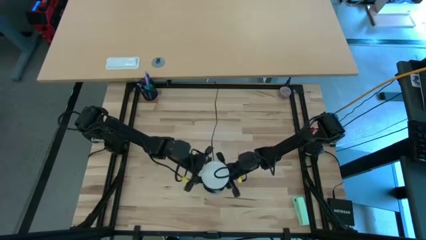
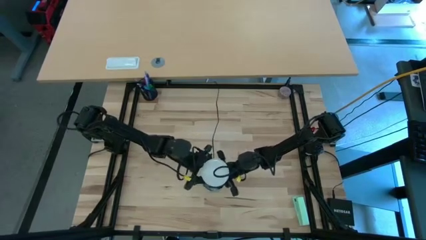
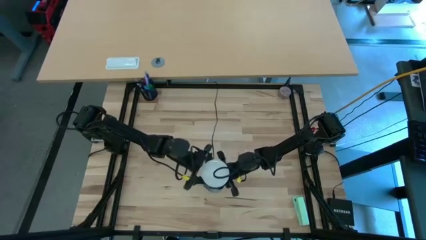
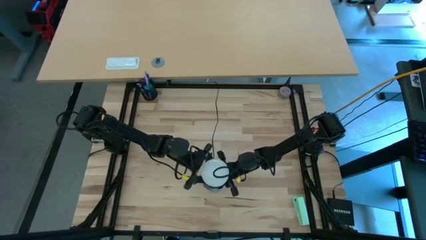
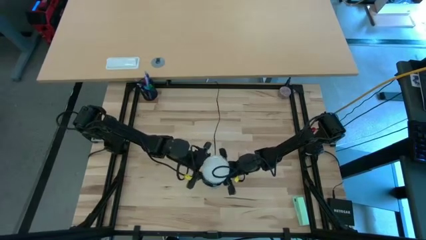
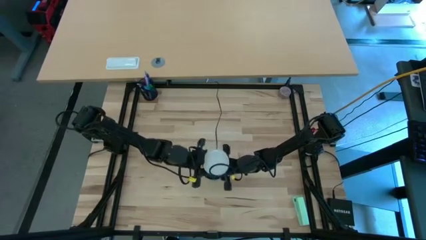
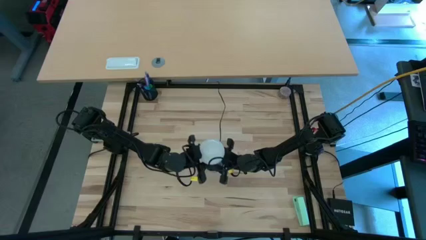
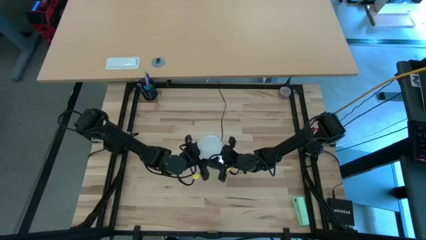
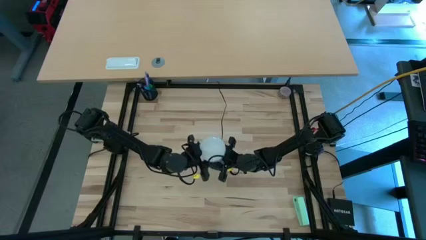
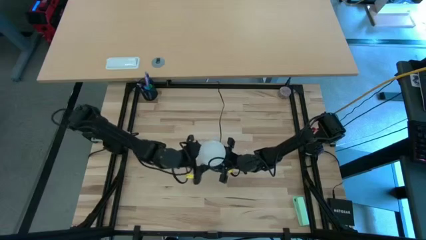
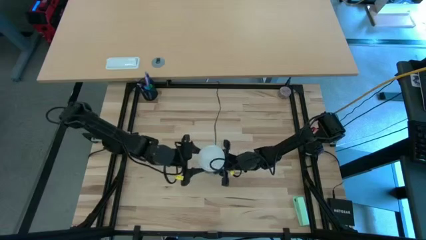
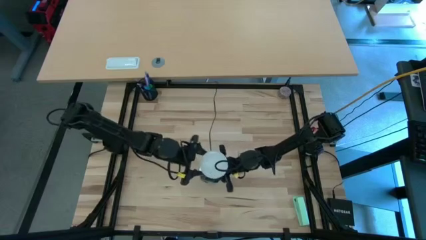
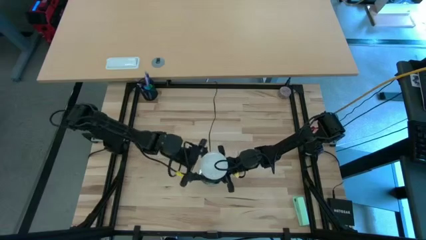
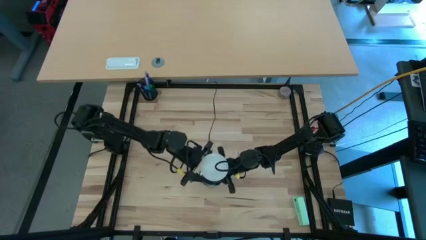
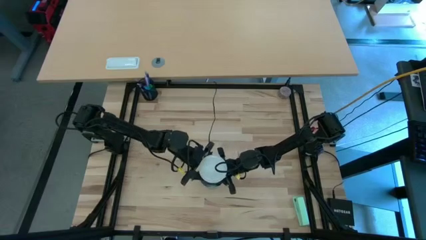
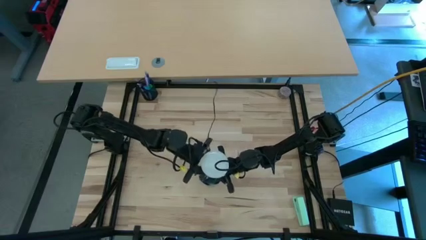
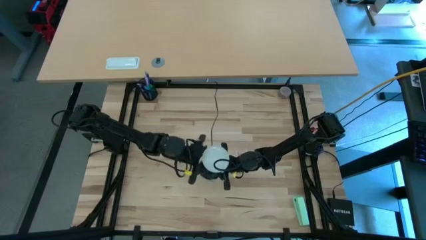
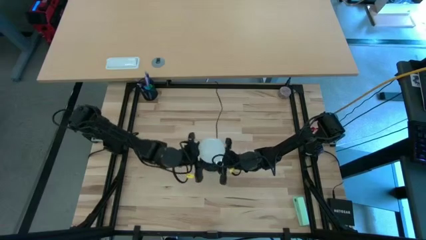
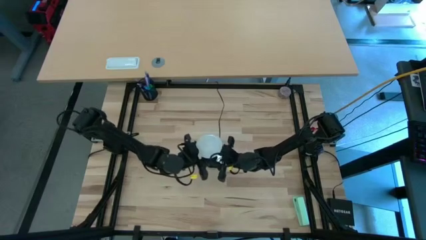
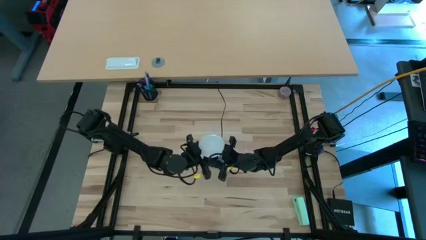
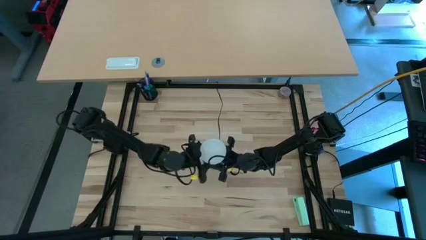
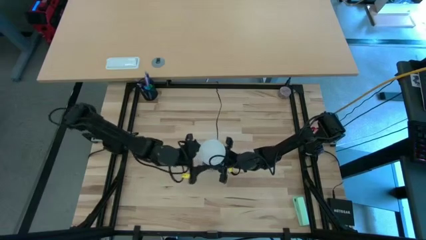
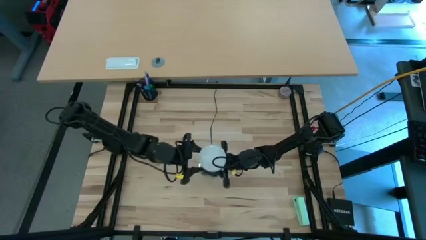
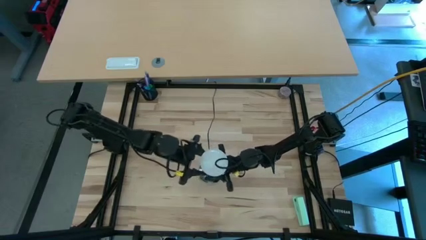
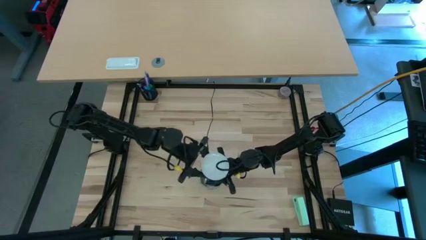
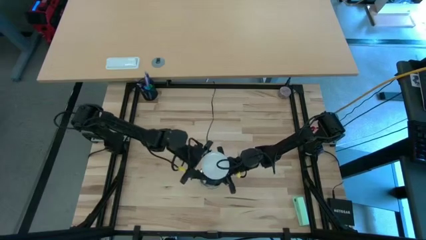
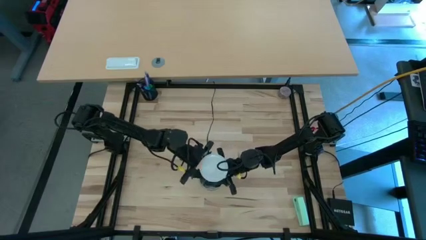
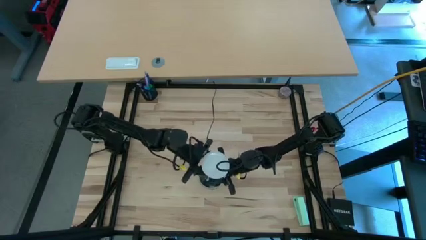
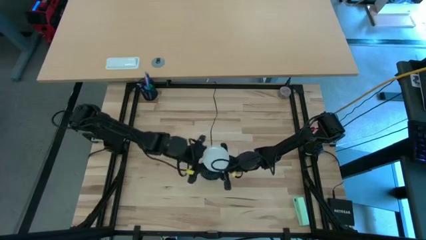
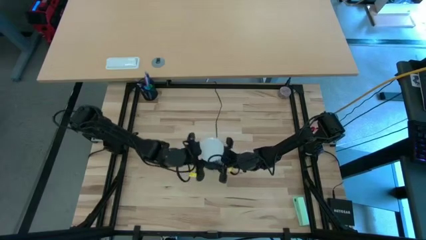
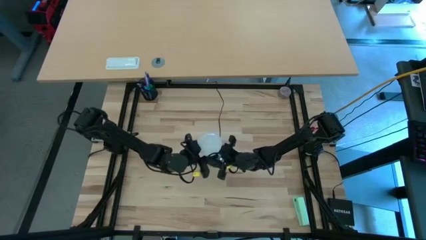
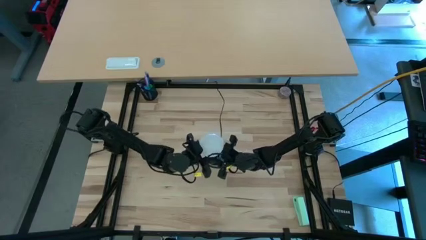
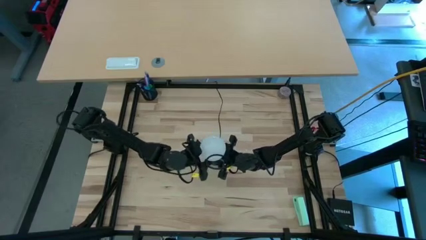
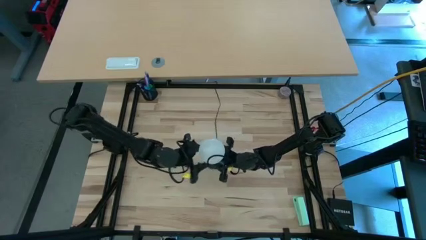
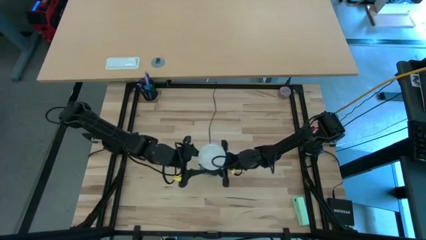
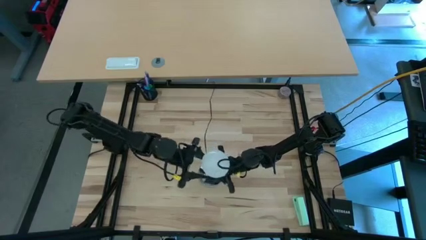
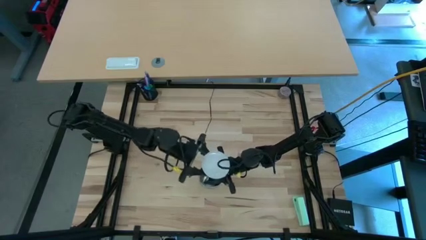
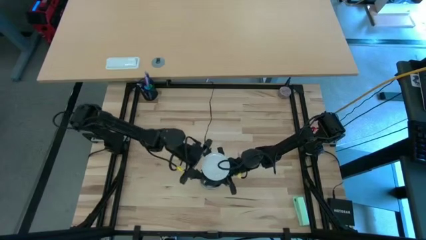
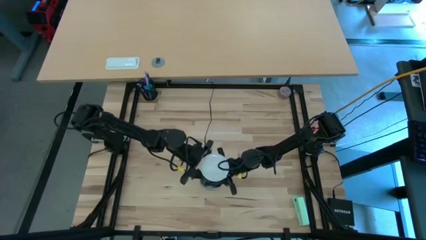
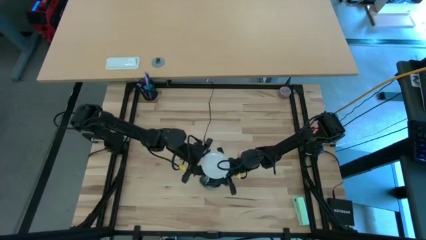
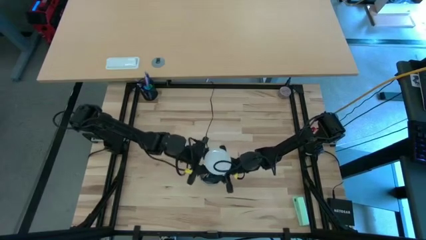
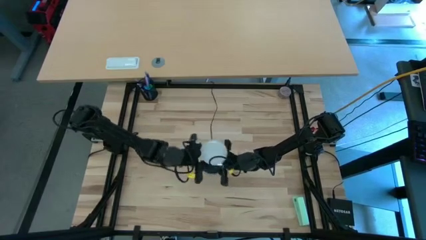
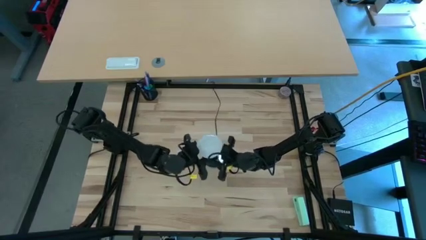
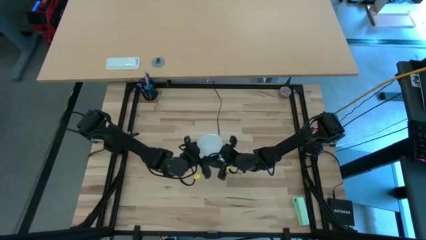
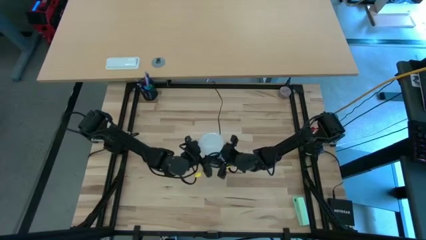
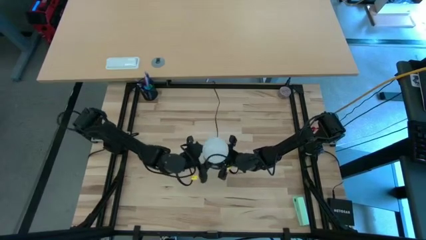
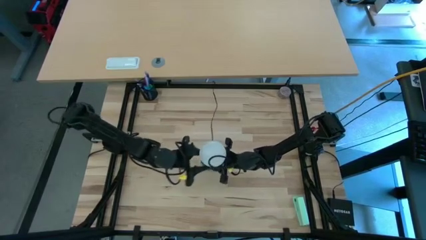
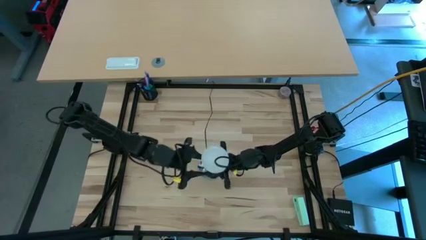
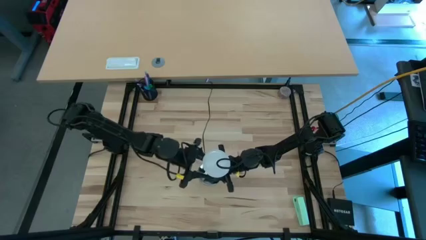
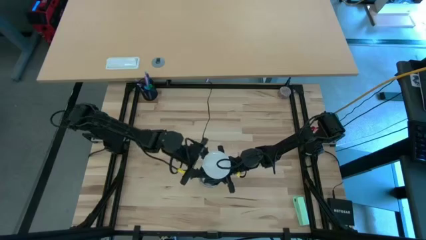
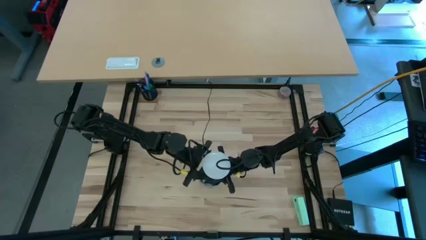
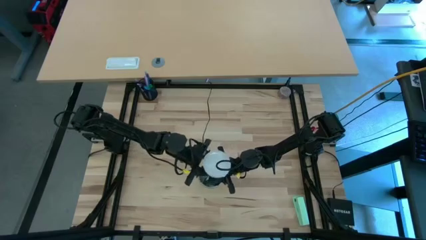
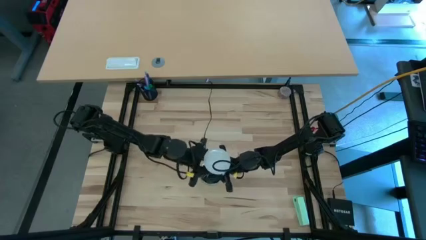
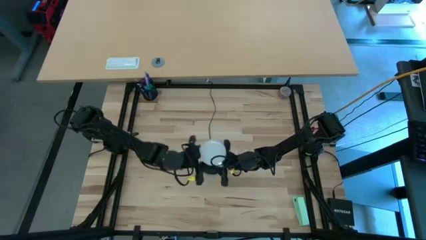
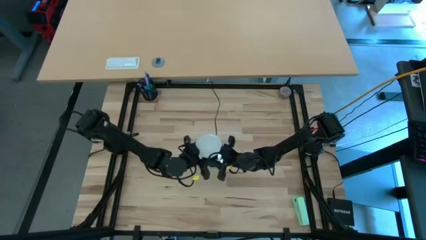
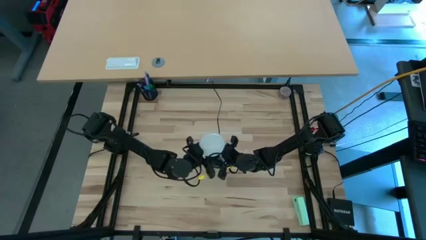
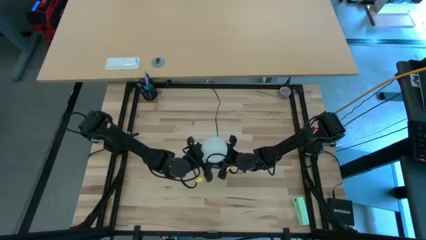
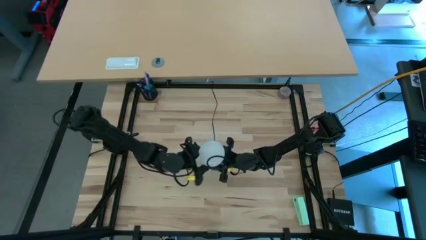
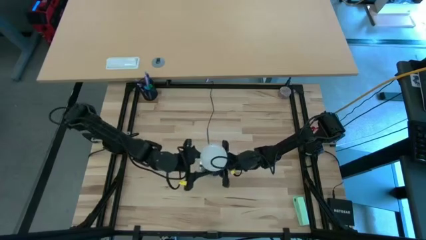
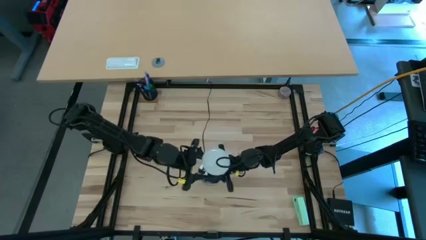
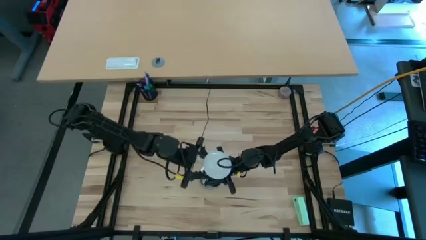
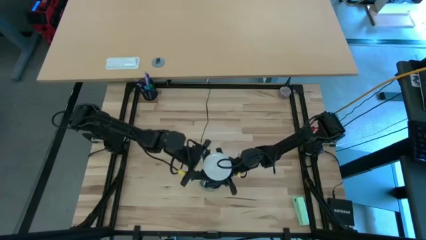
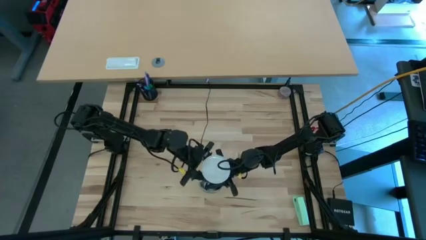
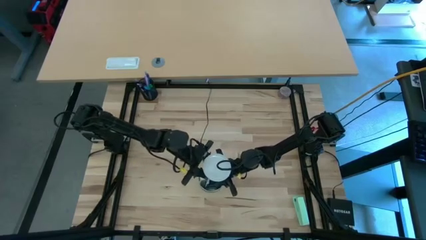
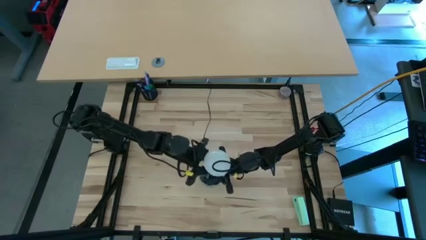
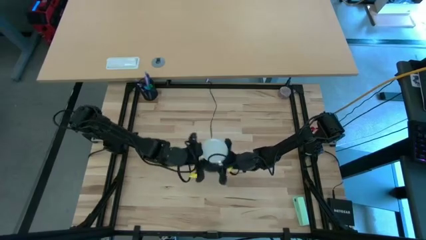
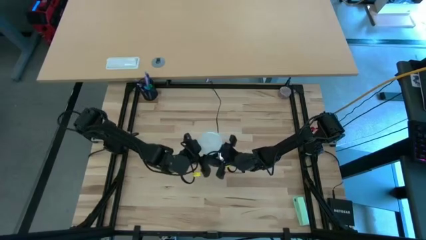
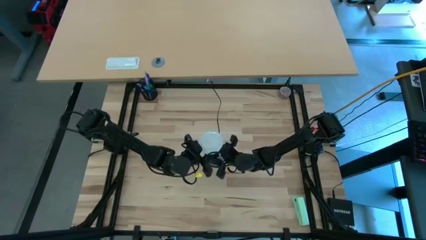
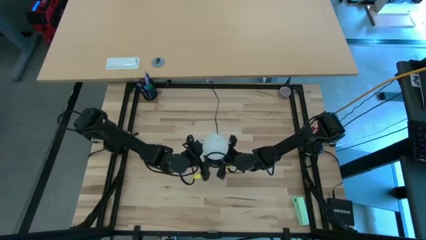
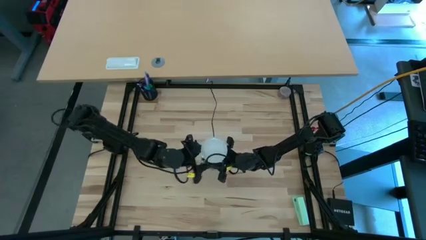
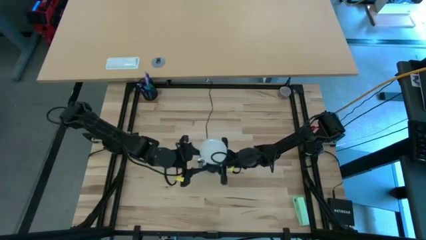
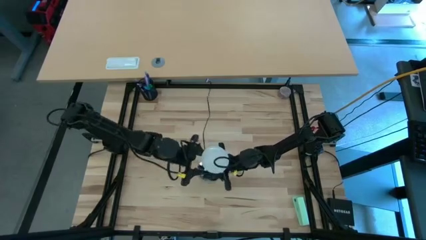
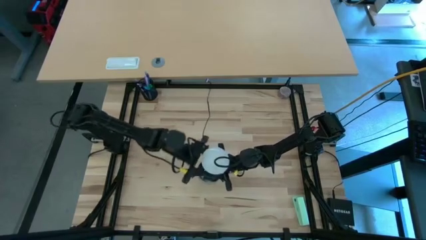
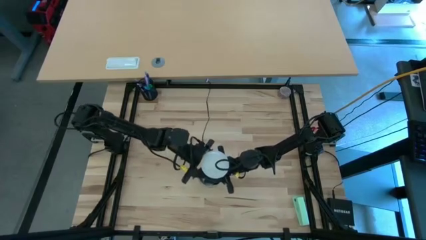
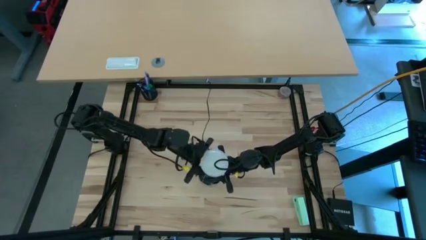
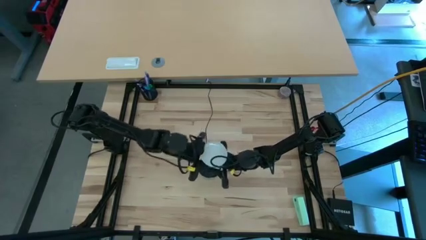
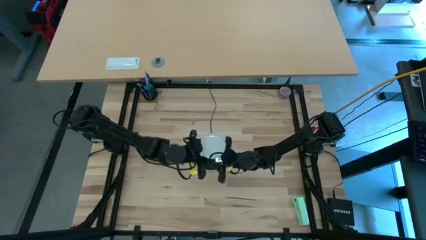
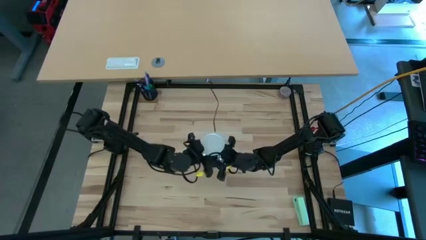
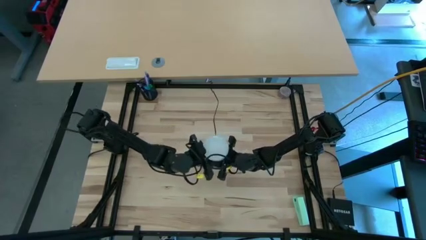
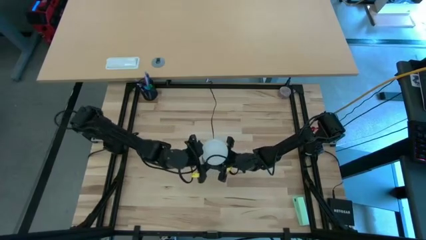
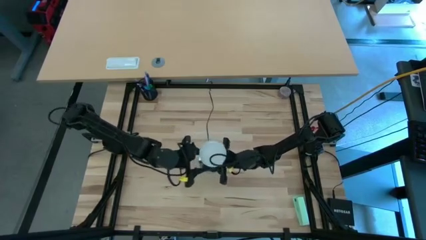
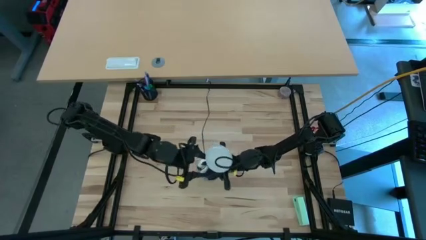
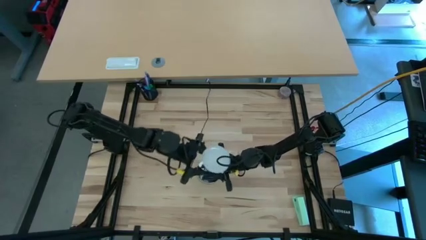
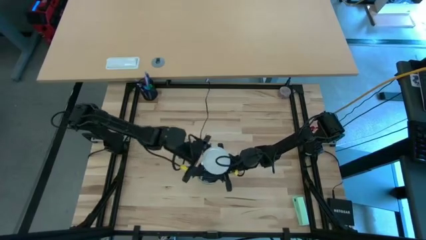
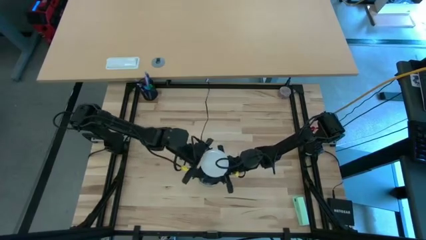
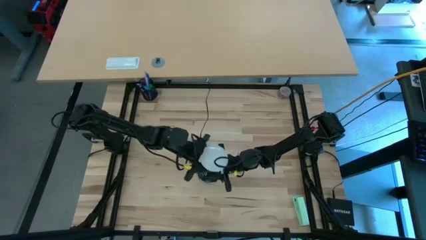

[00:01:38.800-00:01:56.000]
Task: Screw lightbulb
Remove the lightbulb from the lamp
